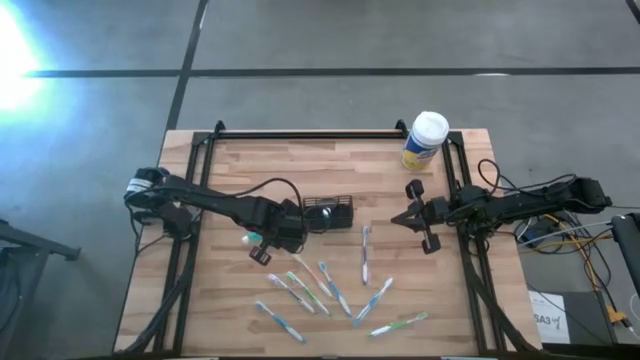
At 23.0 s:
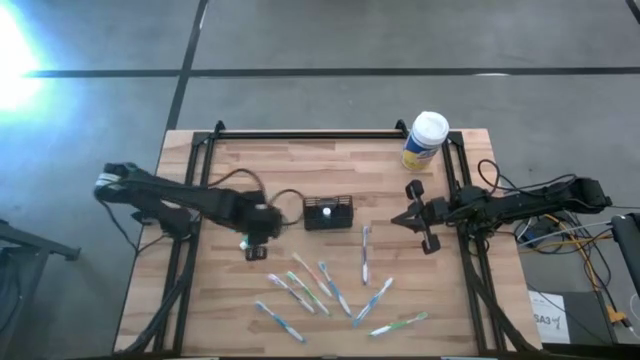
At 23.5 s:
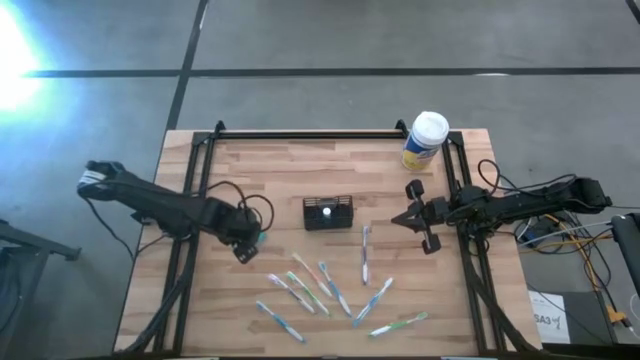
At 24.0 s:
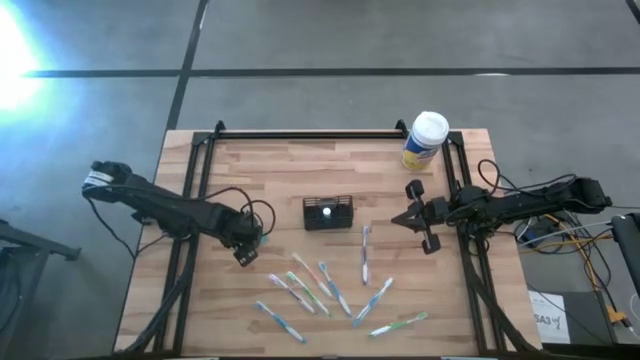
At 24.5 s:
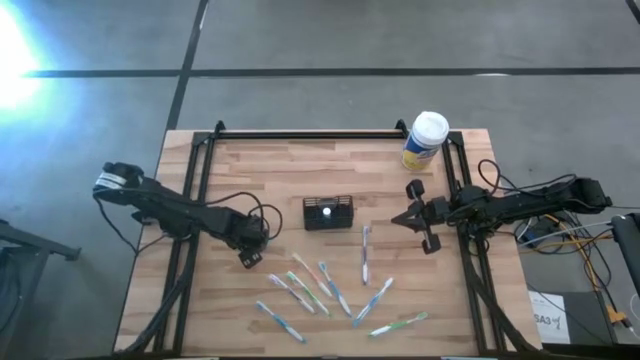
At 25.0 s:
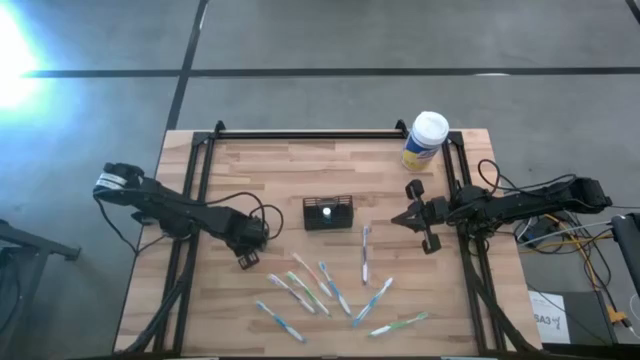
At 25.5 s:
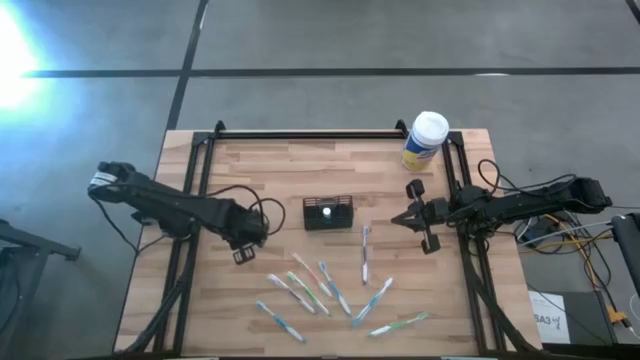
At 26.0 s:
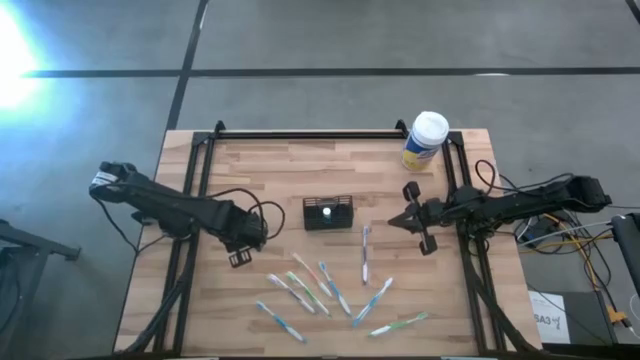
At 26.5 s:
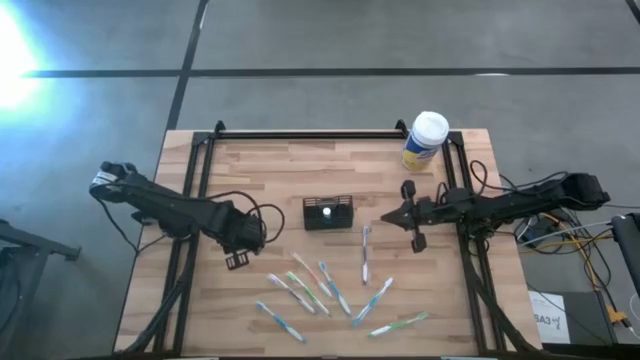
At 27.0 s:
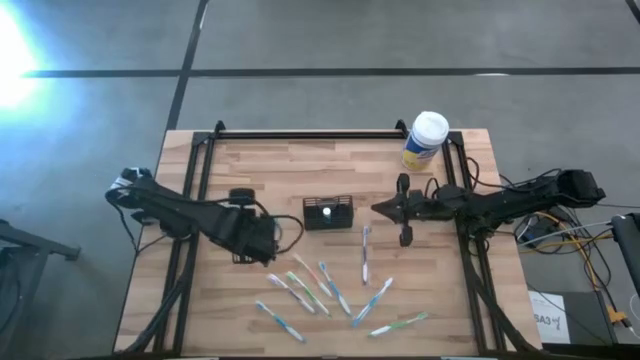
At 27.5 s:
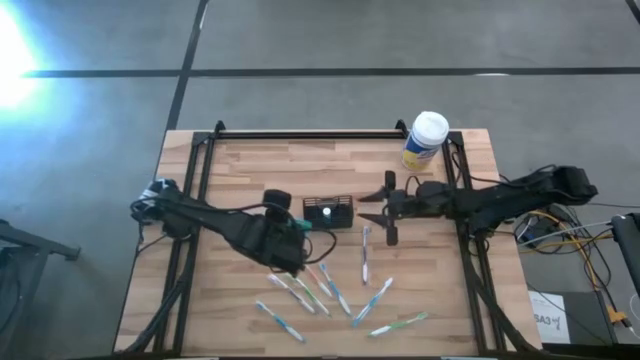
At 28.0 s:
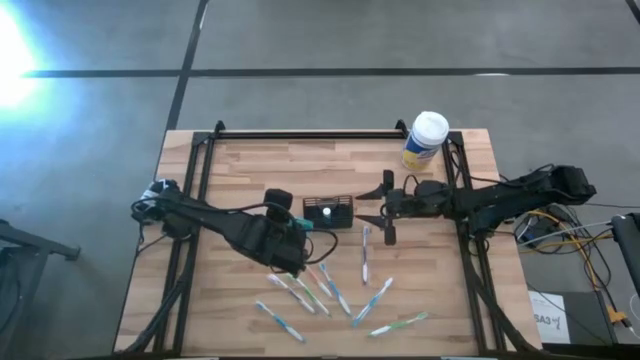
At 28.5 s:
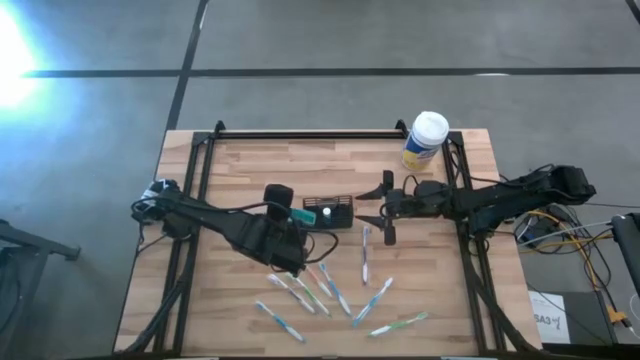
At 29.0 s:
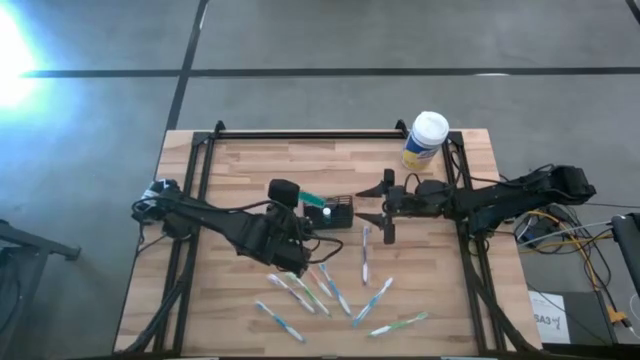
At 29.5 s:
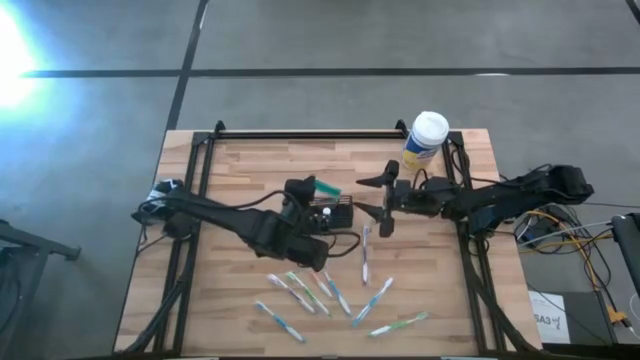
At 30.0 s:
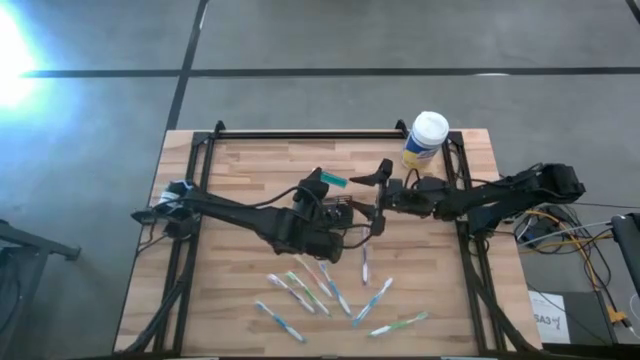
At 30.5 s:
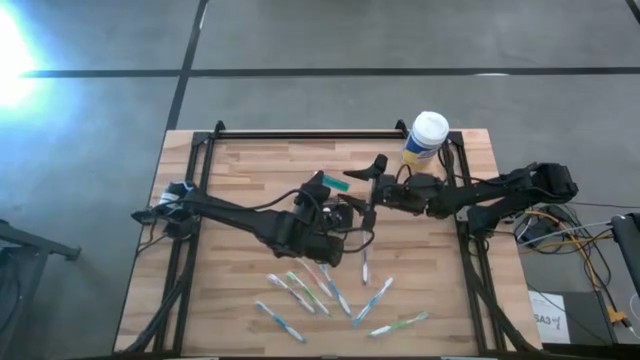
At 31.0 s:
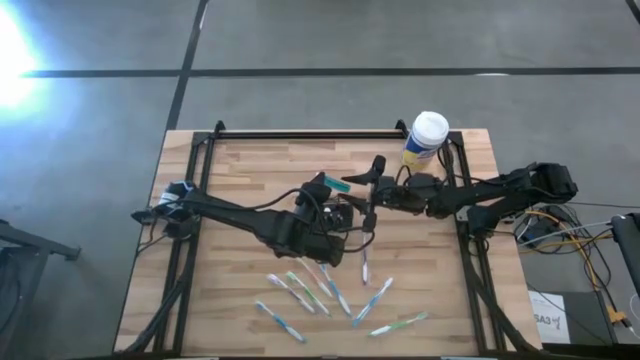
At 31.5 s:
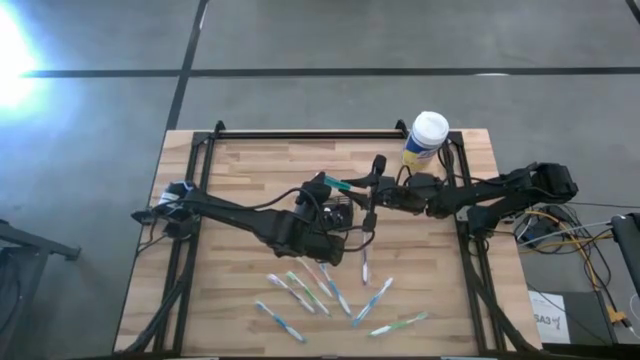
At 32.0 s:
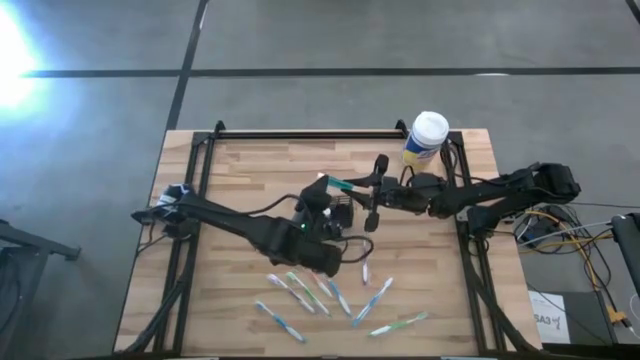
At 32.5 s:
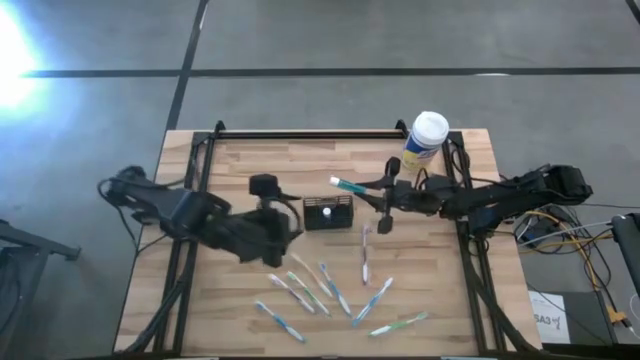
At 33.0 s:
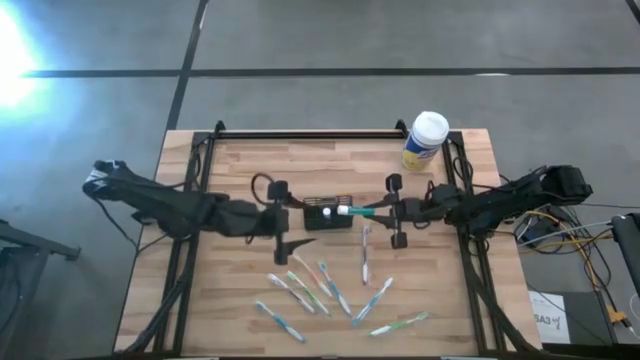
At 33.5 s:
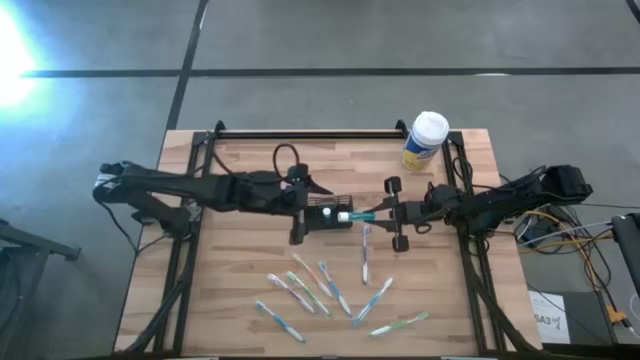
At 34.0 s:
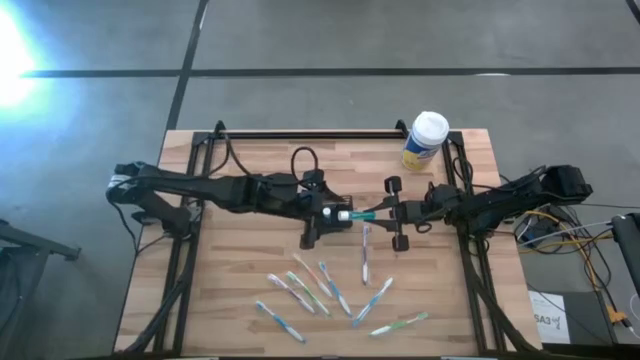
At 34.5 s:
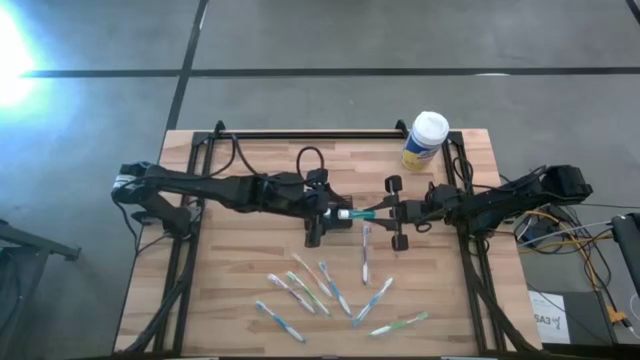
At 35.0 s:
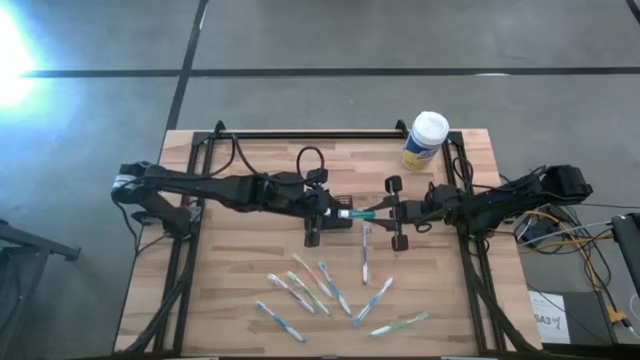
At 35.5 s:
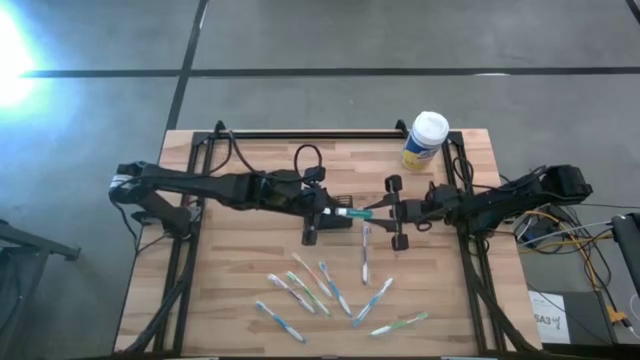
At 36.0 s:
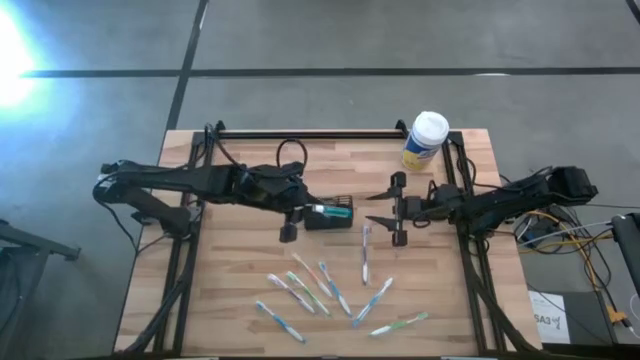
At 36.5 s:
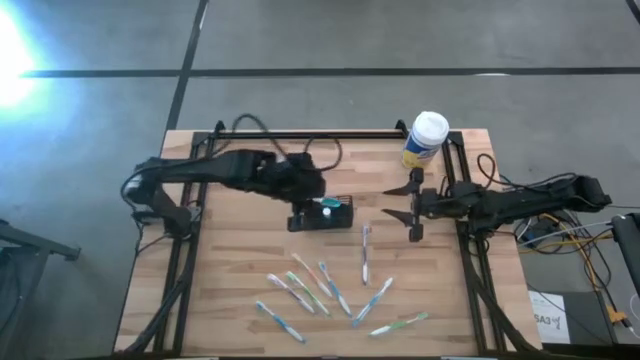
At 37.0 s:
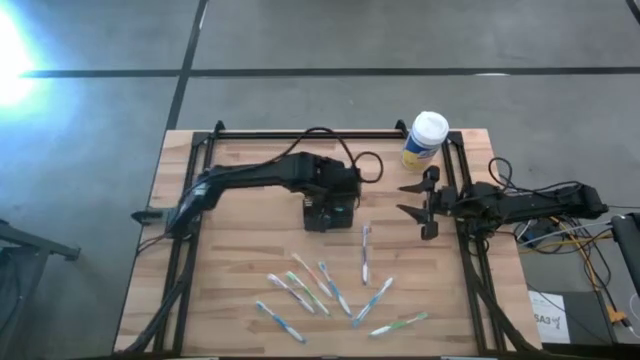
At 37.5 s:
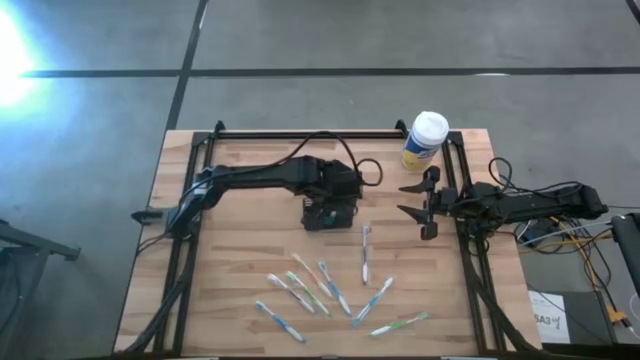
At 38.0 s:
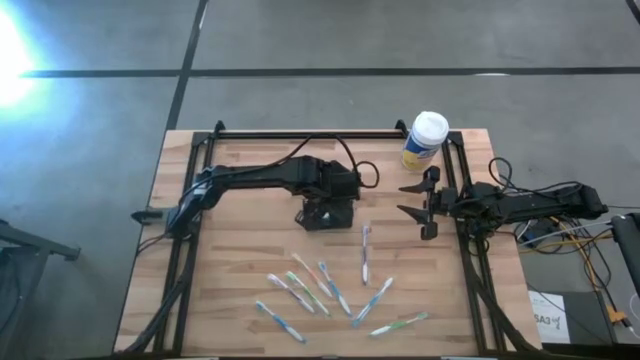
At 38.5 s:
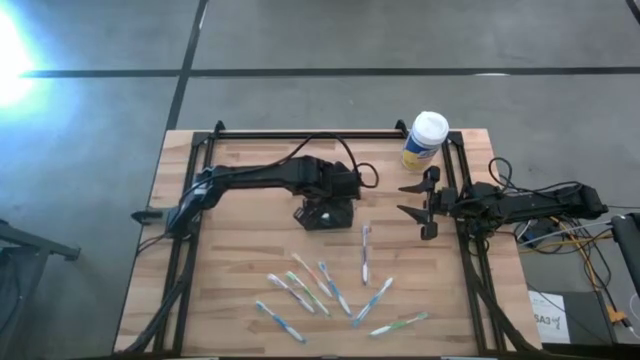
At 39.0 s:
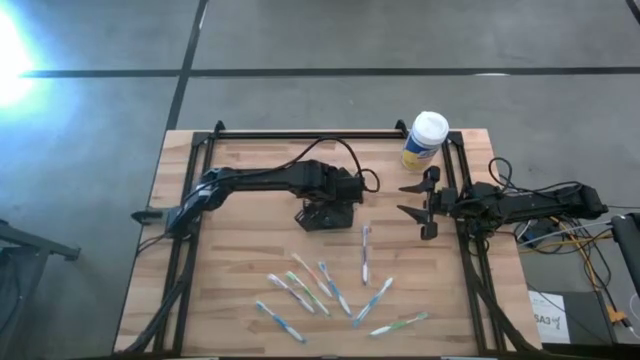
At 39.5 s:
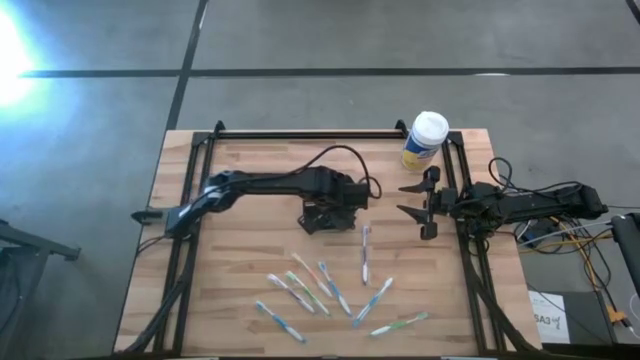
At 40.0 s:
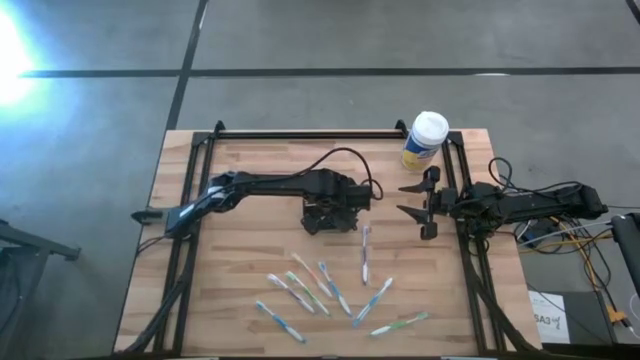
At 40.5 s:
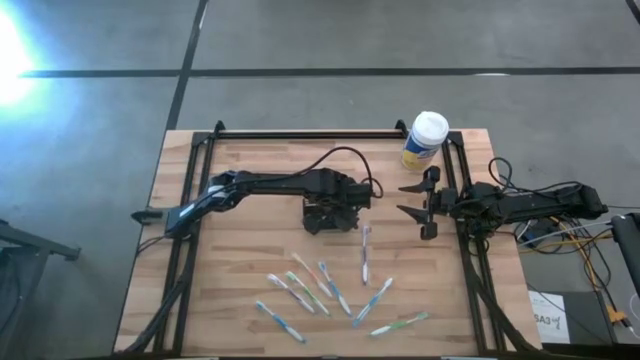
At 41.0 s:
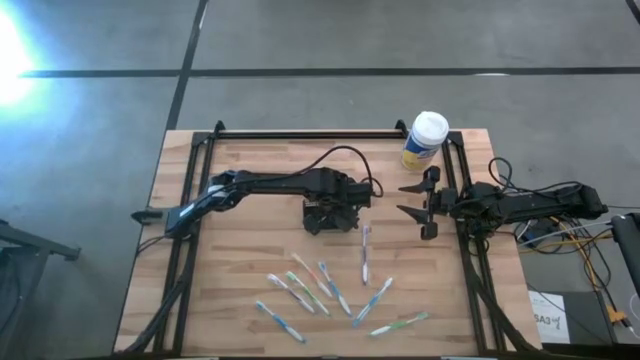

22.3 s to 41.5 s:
Task: Pick & Place toothbrushing station
Put the blue mouthwash into the black wire organizer
